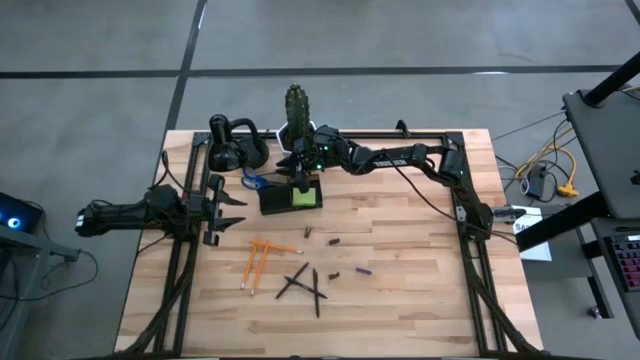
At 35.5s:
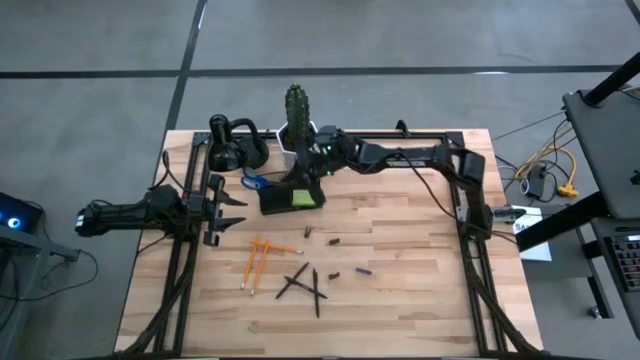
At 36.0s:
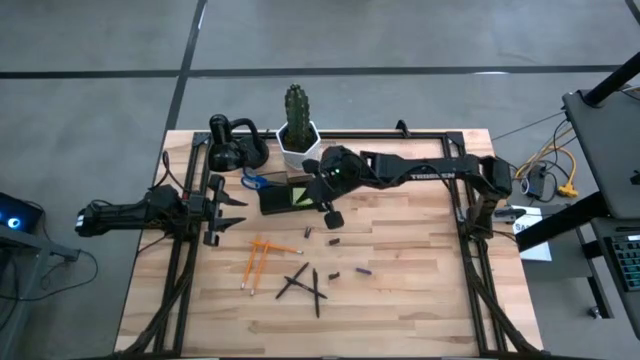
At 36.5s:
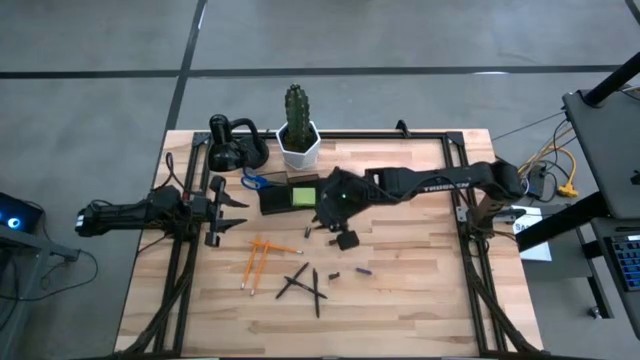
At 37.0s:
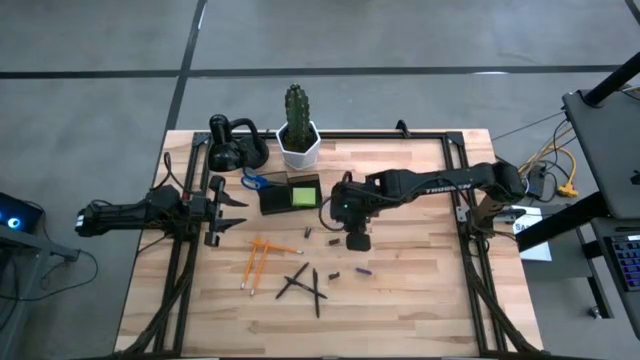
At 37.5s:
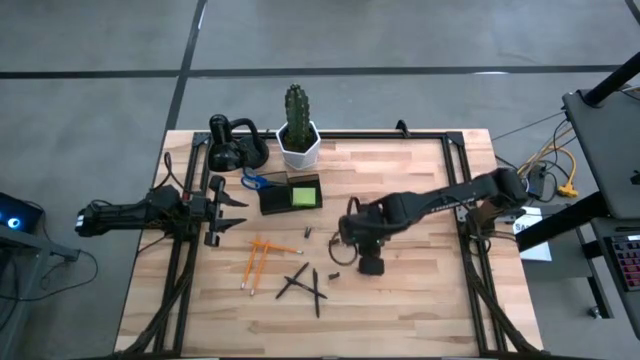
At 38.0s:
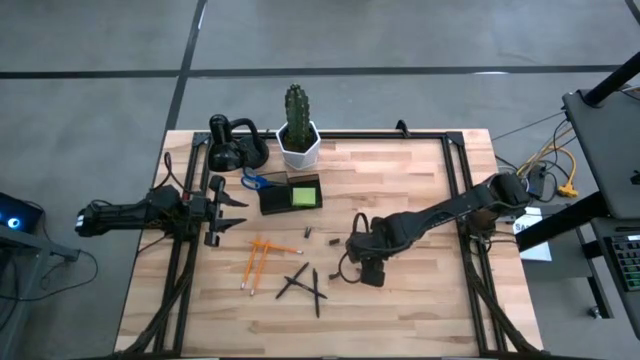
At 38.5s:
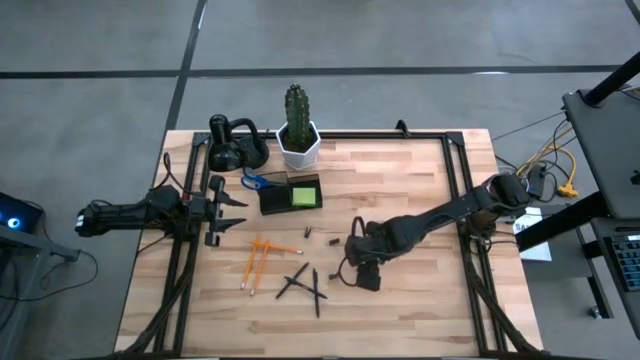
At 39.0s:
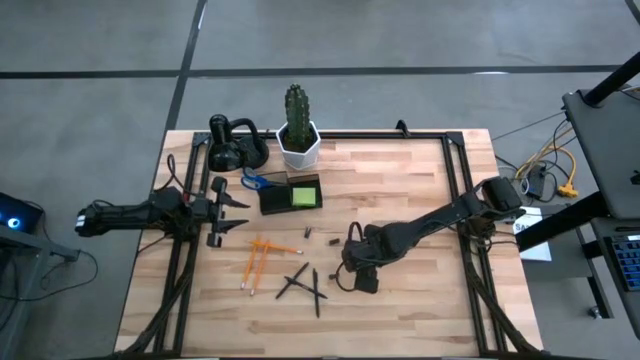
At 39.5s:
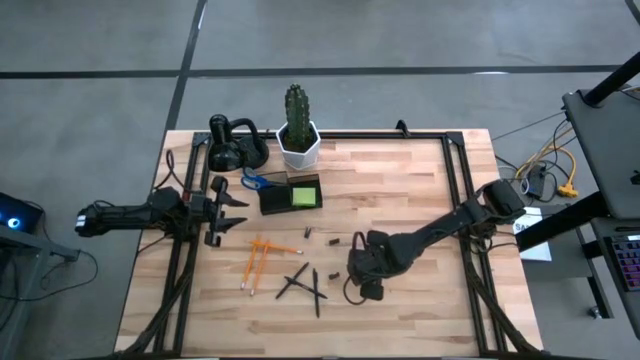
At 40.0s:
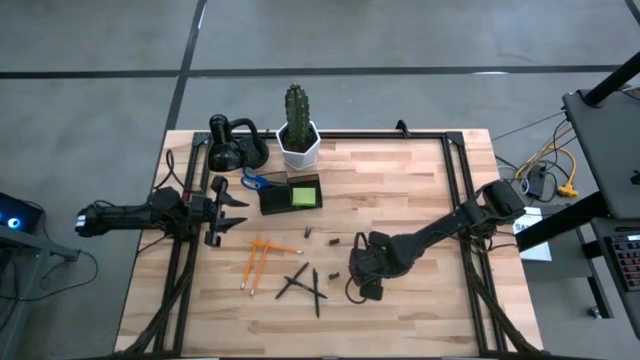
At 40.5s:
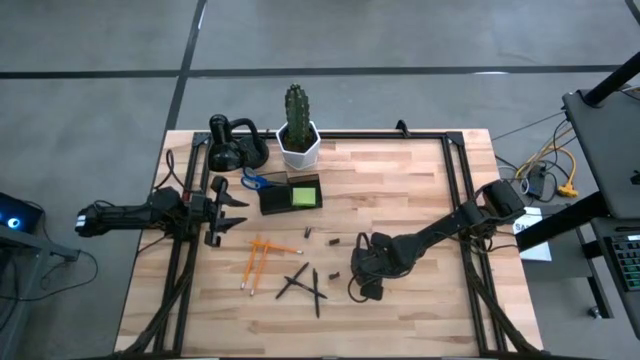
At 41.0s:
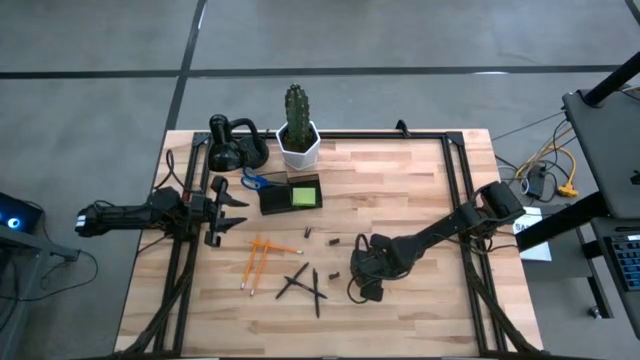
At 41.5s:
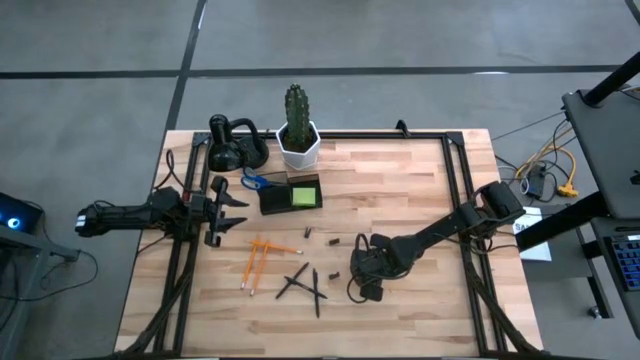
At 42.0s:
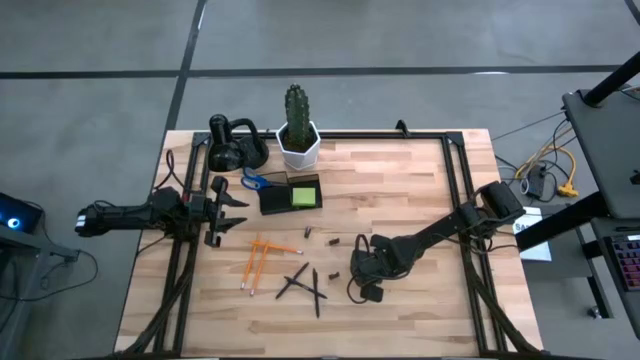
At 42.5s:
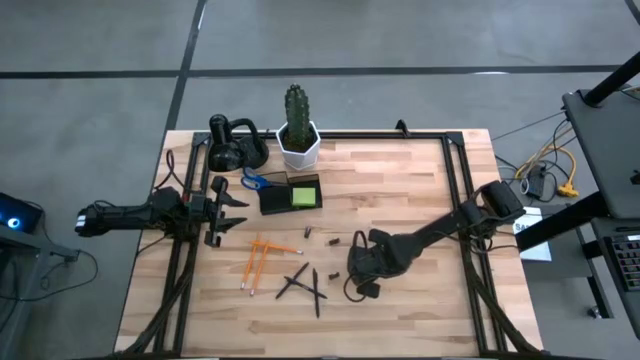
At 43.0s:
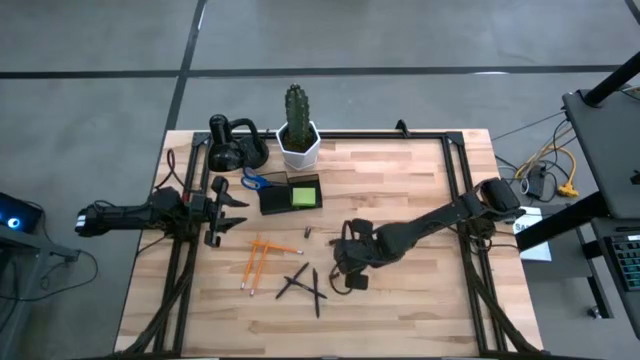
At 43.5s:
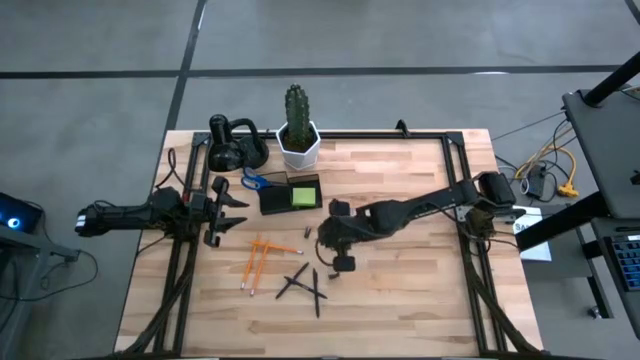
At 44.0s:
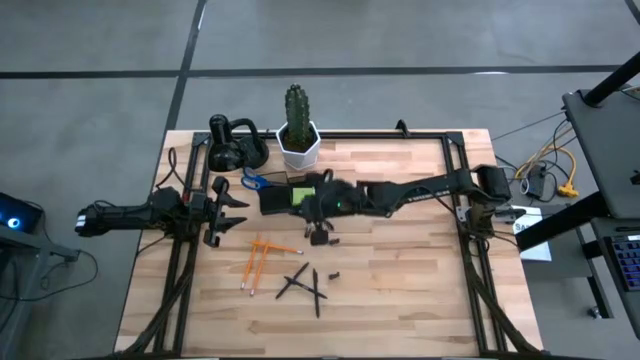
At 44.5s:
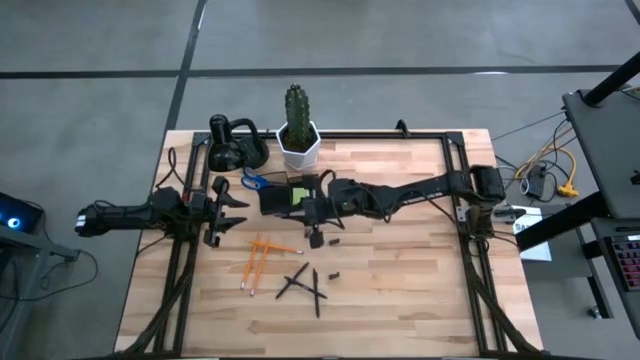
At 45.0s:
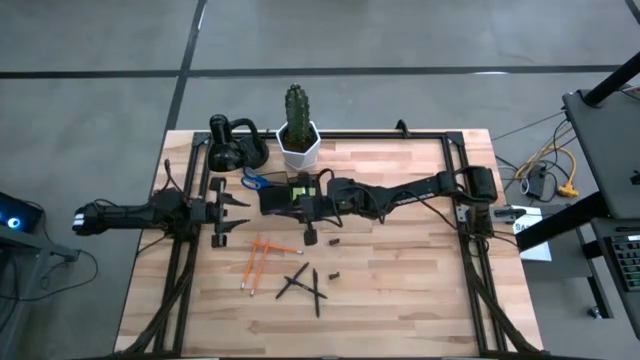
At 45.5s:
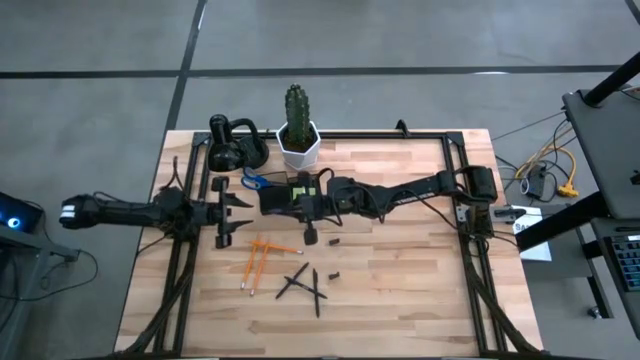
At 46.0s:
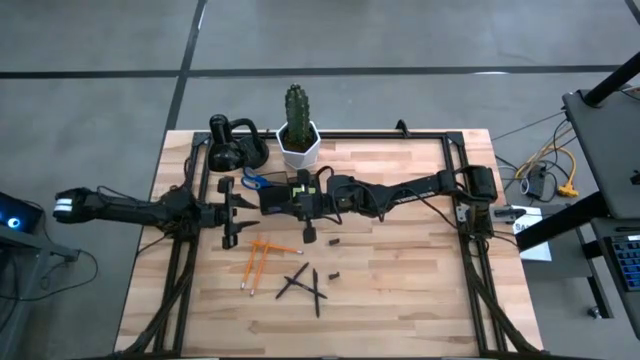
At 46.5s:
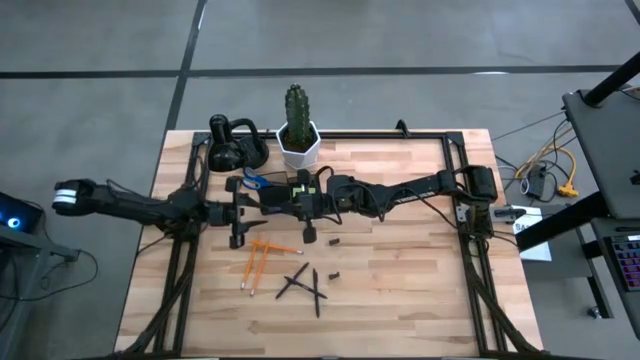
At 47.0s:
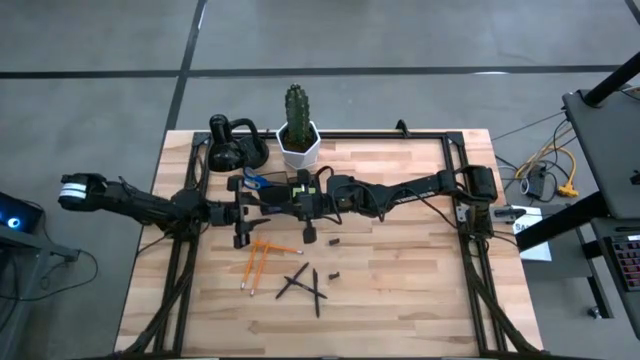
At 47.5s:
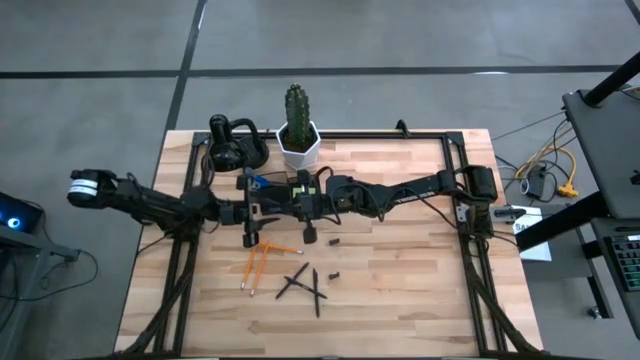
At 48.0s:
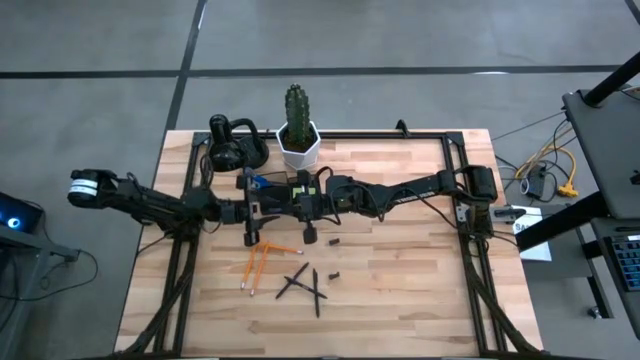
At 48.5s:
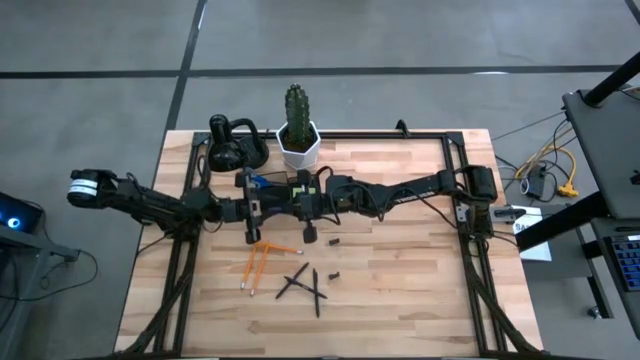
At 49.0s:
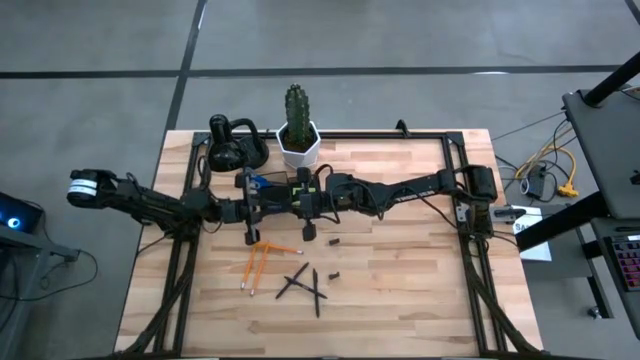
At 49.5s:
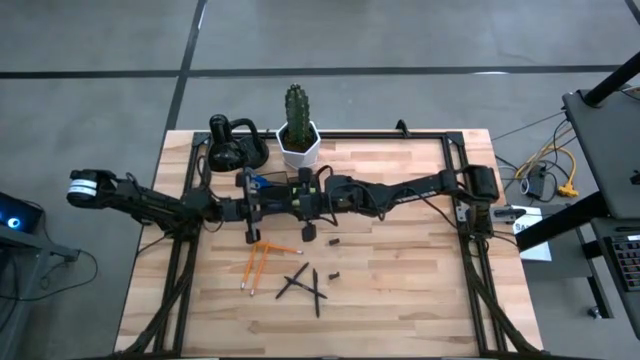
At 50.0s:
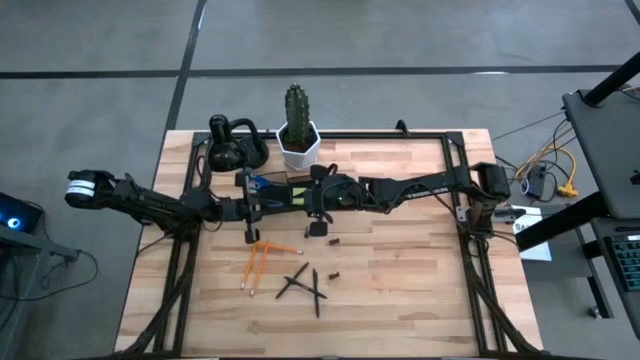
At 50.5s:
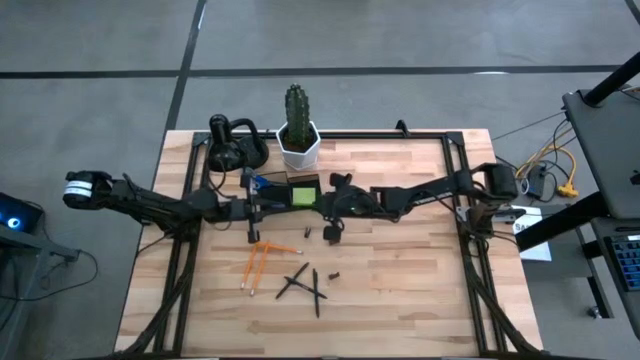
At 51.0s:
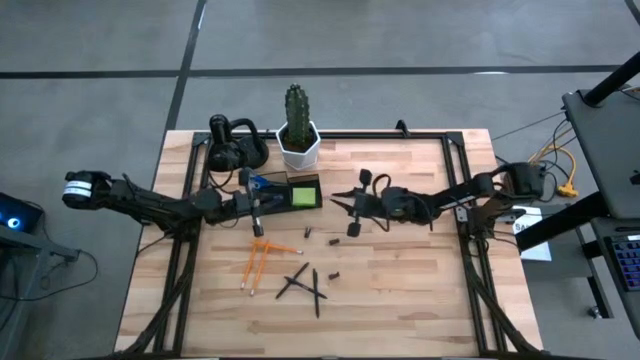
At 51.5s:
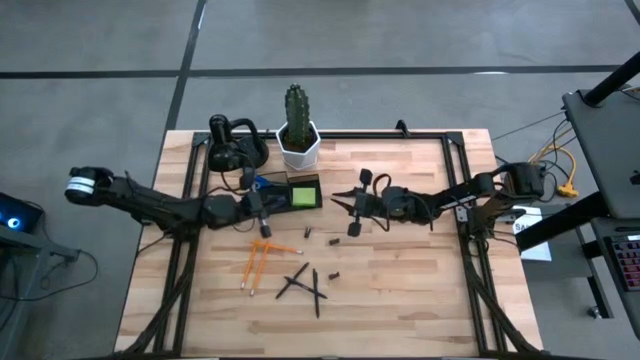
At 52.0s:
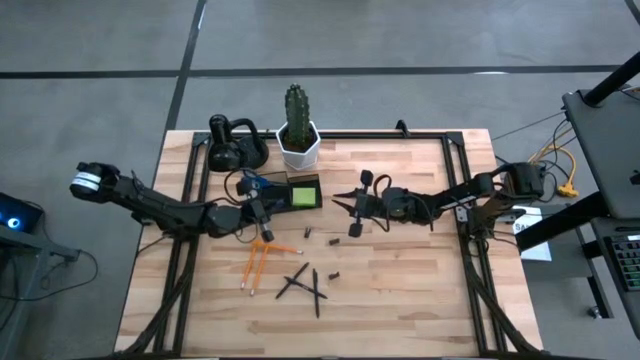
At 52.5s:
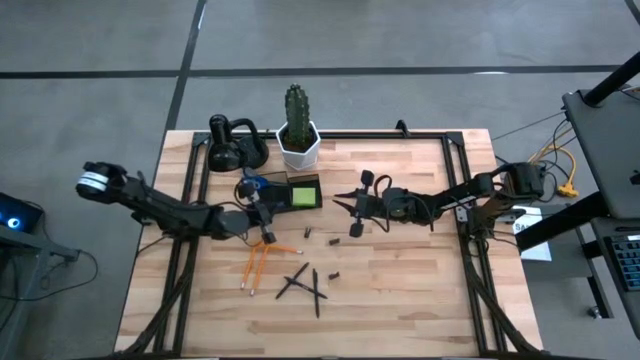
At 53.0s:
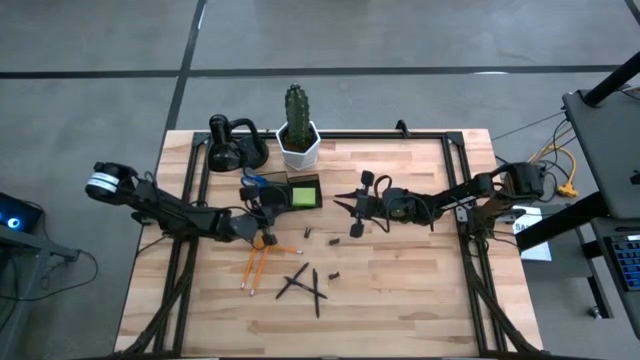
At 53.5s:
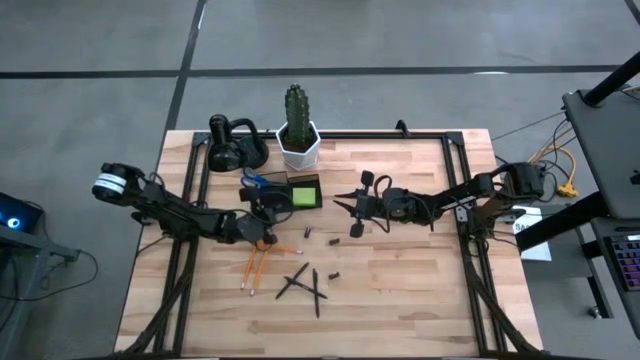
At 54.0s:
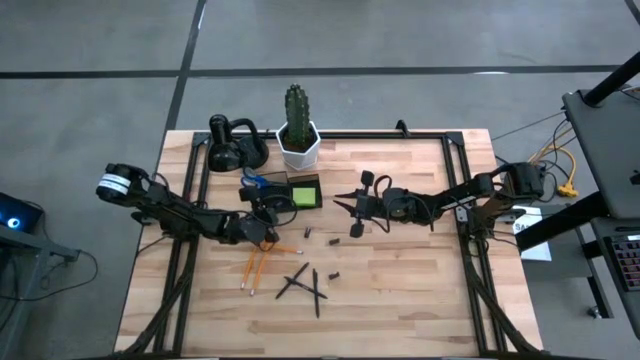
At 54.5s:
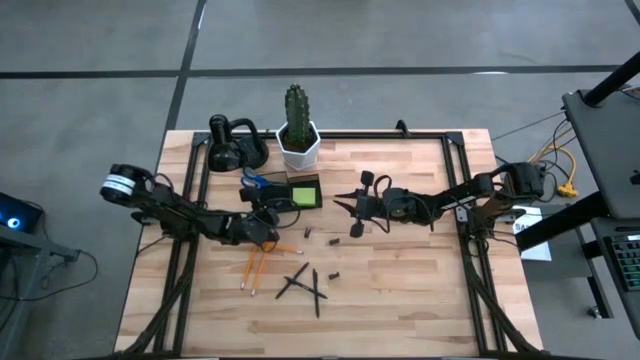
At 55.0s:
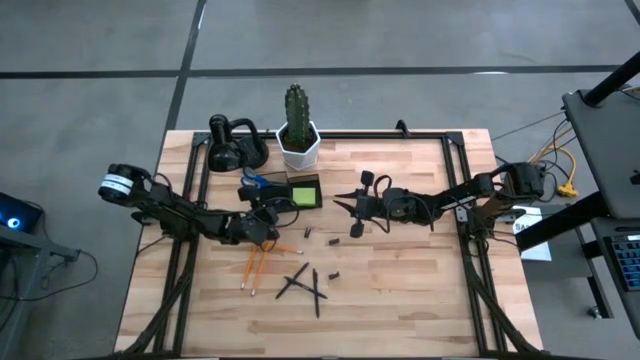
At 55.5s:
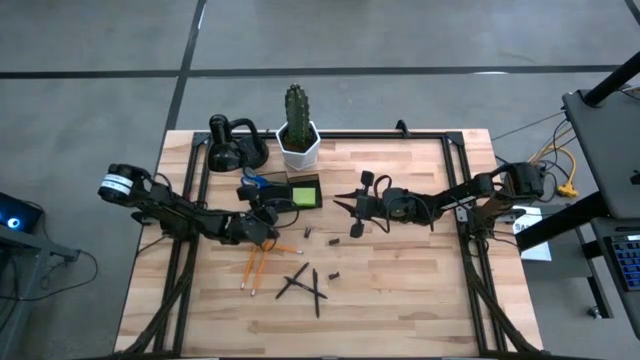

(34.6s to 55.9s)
Task: Pick and place office supplies into organizer
Put the blue eraser into the black desk organizer
